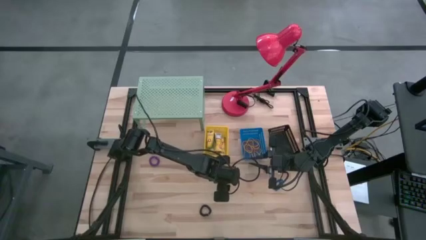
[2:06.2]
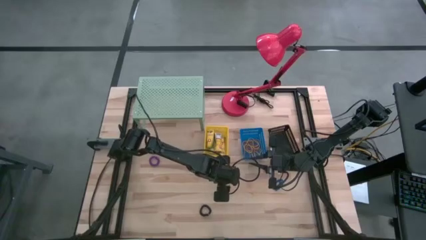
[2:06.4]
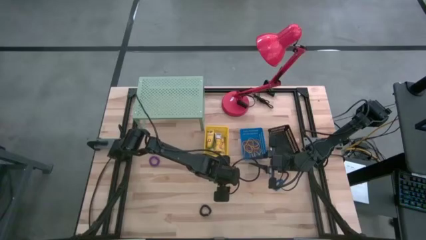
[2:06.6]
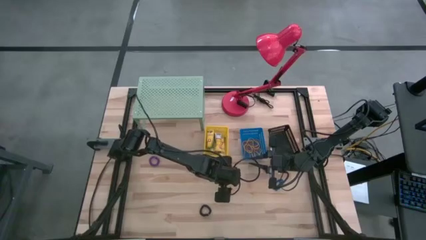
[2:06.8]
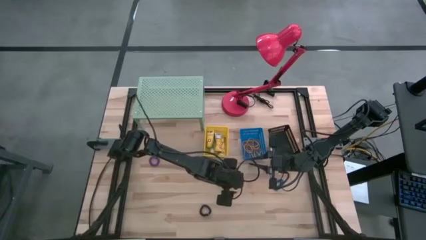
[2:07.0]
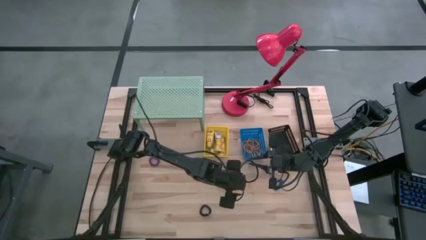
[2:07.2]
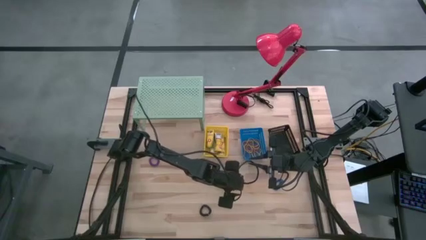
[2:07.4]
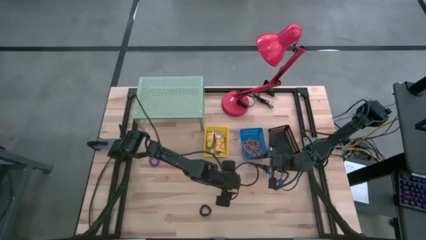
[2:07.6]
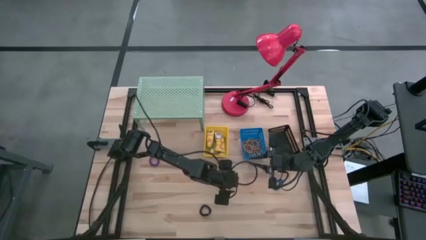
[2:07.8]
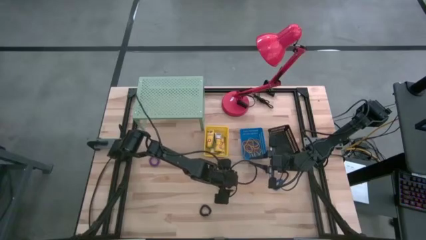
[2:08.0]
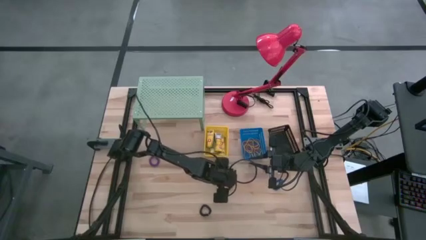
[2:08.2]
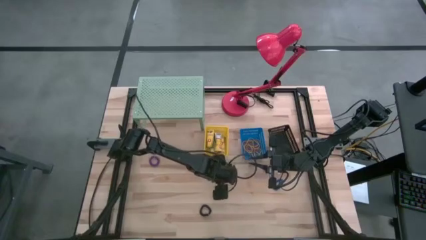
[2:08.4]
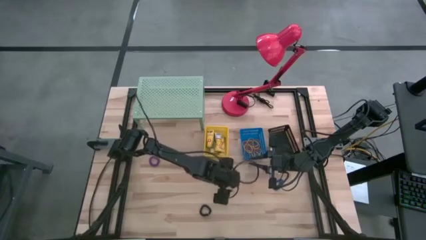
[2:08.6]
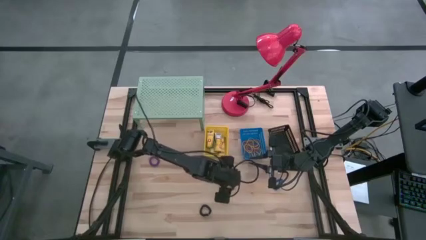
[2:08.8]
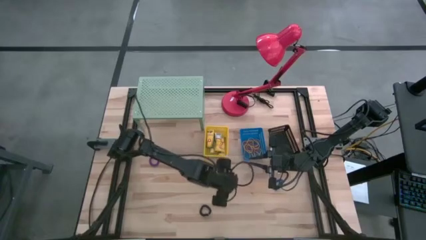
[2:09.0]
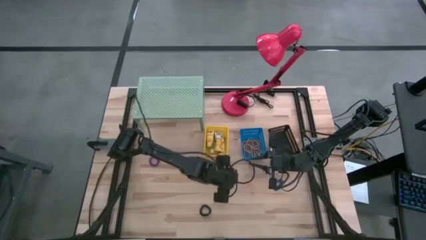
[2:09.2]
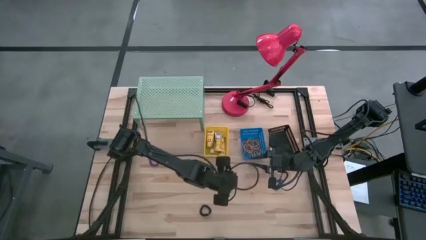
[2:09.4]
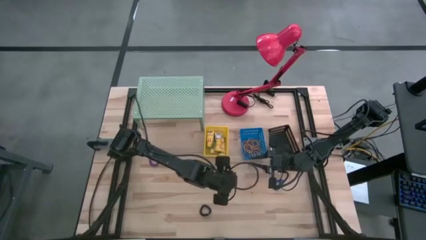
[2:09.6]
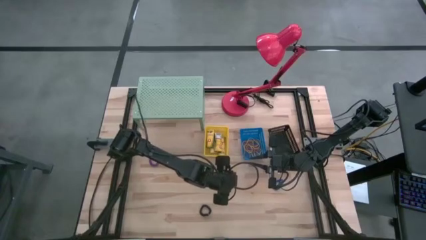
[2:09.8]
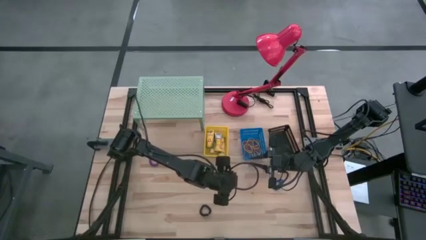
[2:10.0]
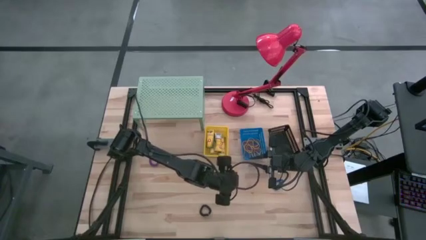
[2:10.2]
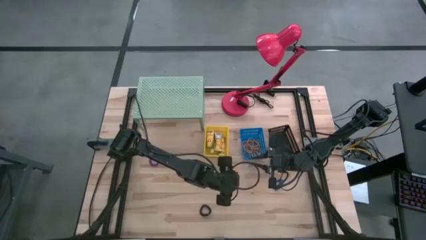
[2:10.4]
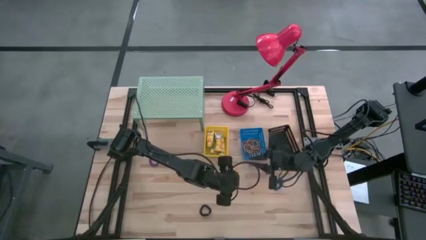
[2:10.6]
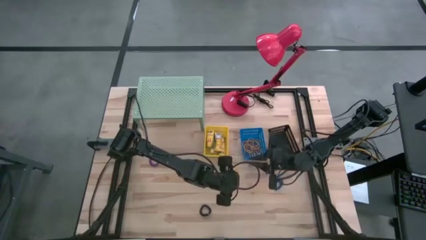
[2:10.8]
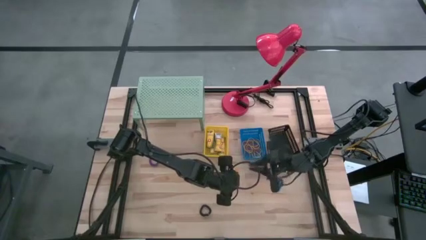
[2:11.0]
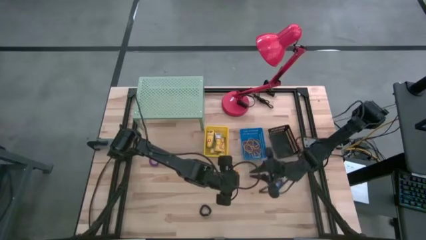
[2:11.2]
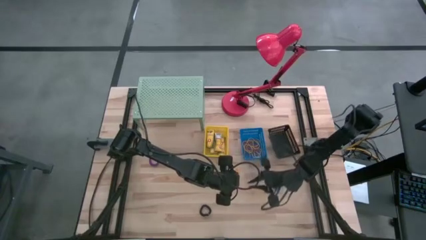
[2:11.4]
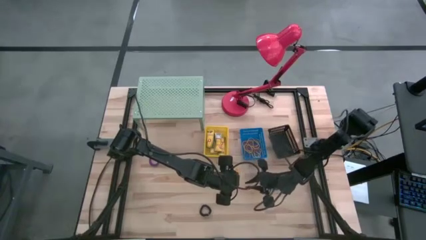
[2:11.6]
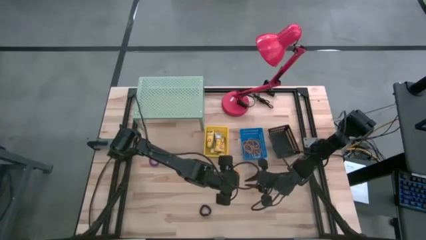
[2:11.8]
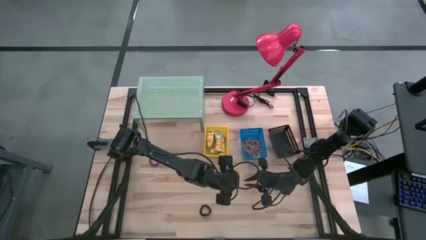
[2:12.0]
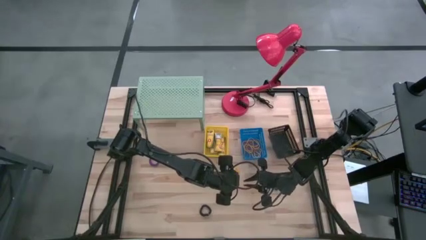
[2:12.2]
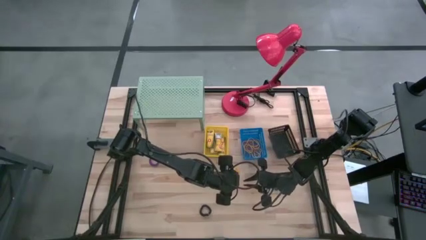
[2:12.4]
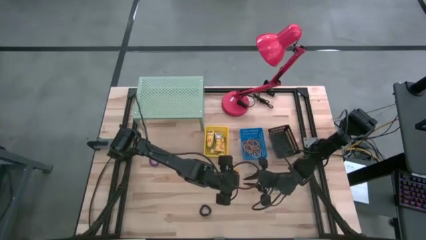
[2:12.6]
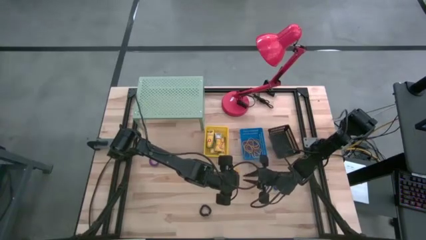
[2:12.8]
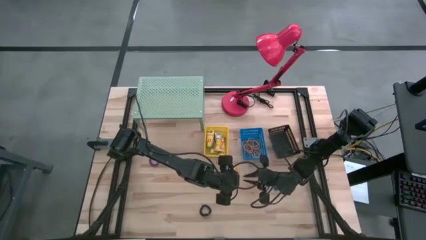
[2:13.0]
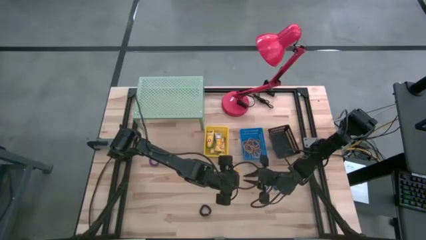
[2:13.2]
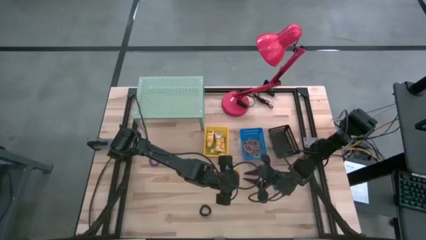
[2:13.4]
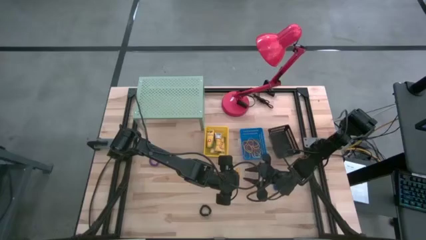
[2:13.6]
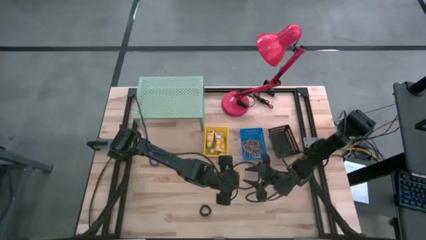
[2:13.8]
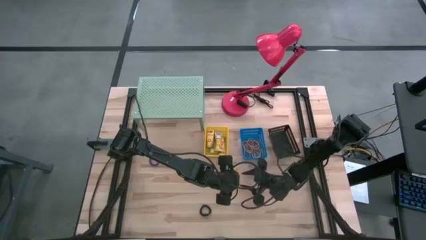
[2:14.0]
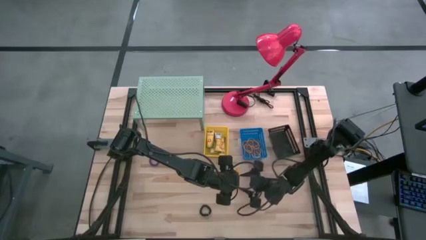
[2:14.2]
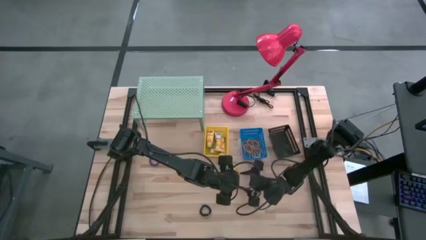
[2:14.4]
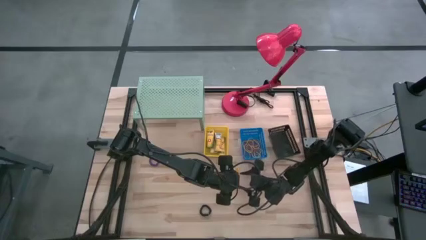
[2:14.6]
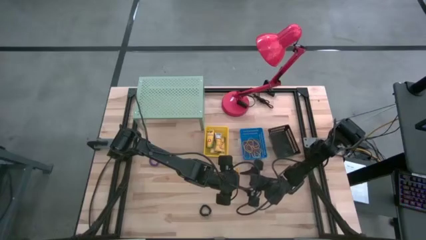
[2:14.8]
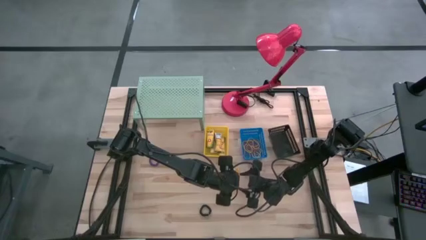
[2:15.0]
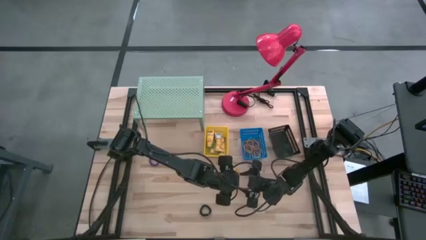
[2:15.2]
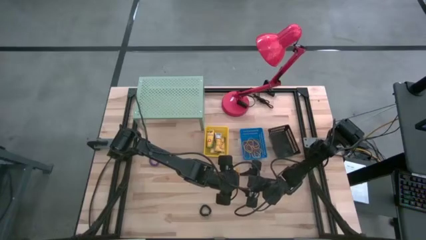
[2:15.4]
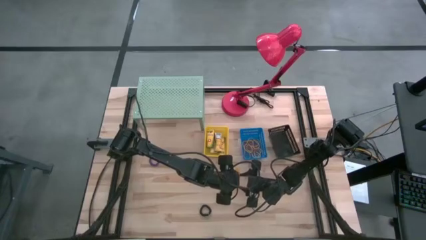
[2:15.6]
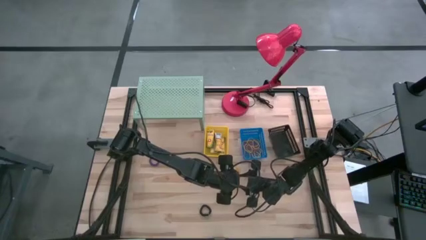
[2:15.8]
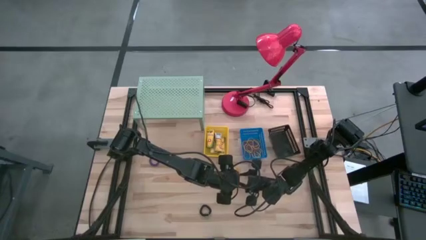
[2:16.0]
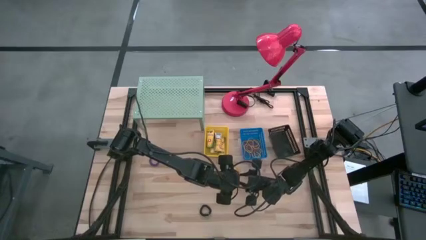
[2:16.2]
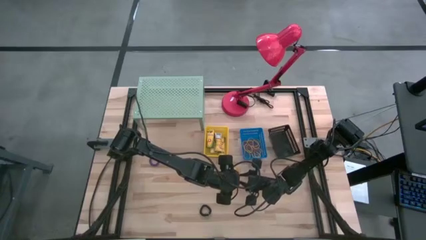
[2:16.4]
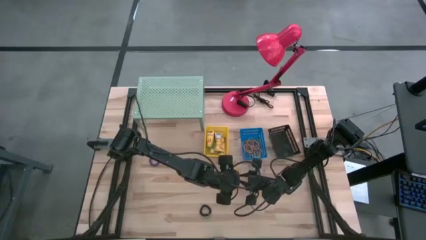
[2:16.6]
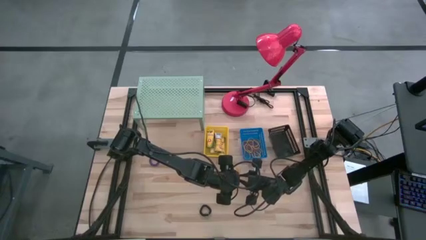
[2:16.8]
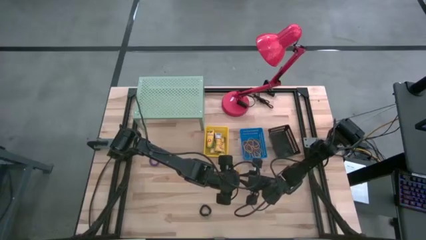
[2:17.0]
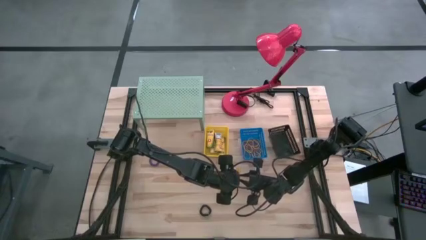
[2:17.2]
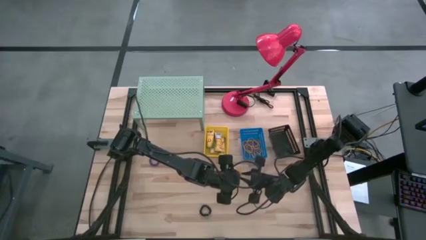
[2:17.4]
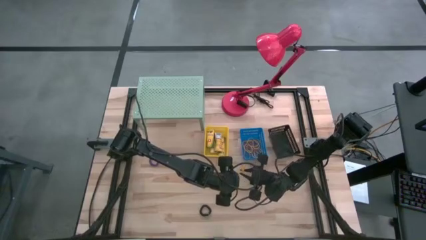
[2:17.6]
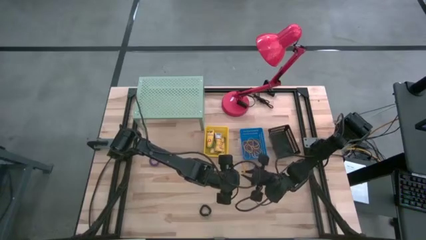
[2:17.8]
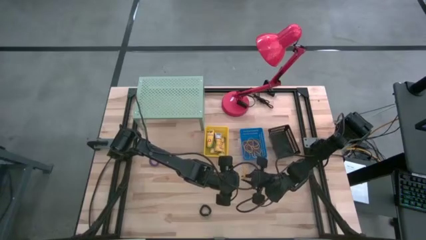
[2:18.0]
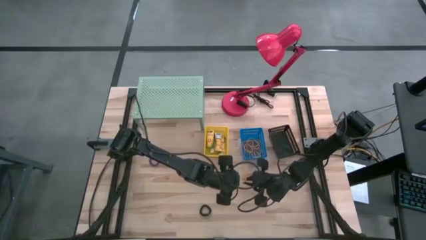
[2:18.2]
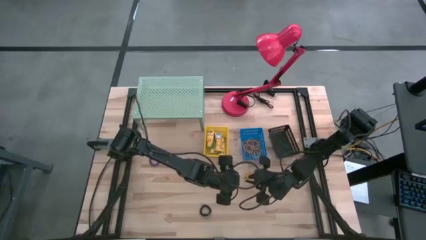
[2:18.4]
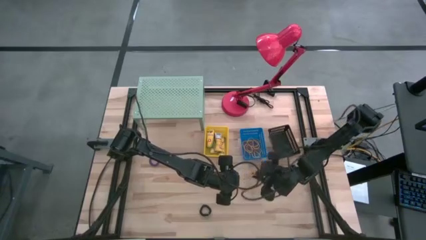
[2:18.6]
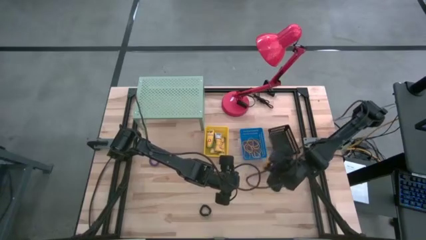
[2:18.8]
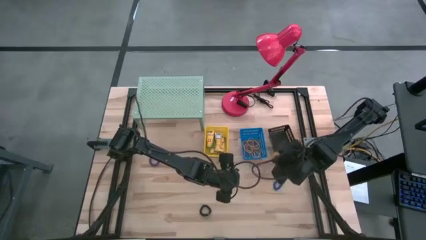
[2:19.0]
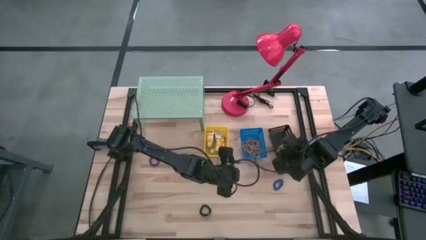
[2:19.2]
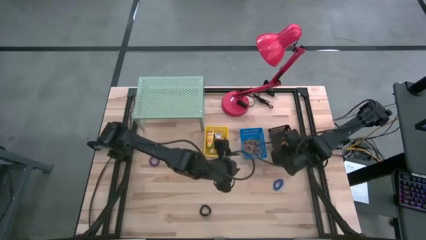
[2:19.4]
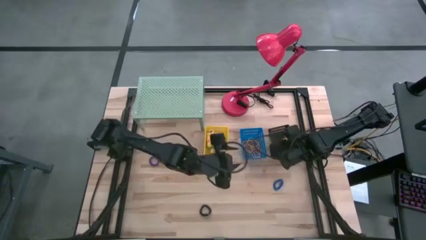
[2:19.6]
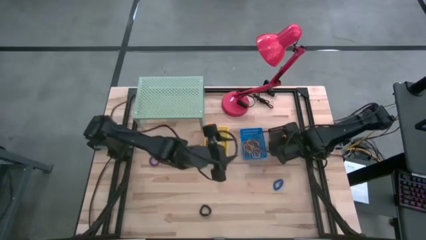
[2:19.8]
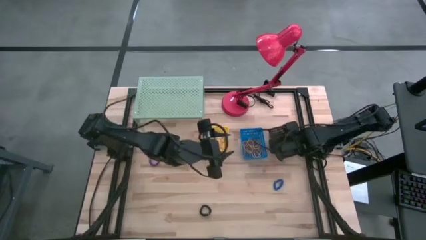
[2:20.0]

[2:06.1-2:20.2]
Task: Pick & Place Office Desk Supplies
Put the yellow spring keychain into the black basket

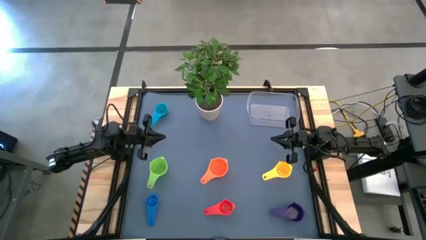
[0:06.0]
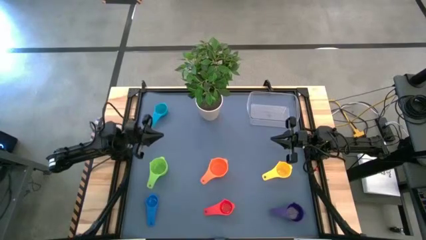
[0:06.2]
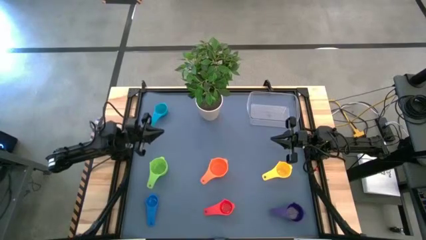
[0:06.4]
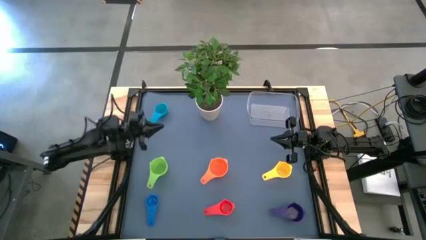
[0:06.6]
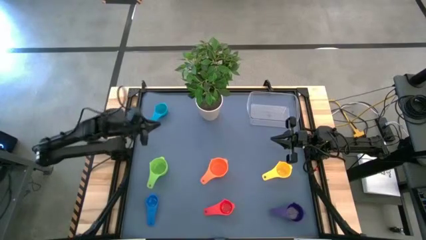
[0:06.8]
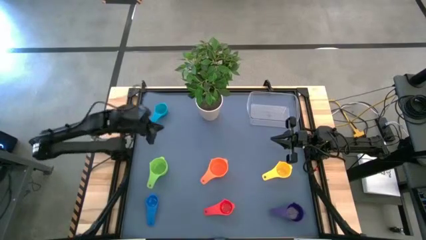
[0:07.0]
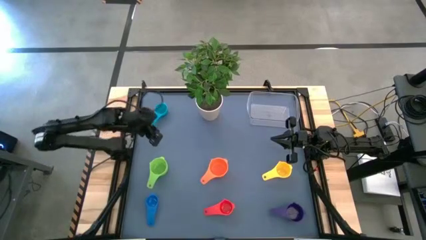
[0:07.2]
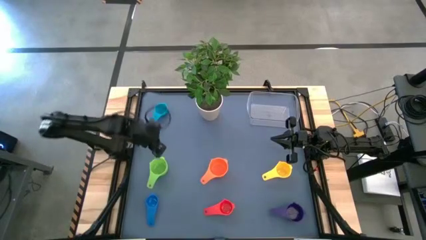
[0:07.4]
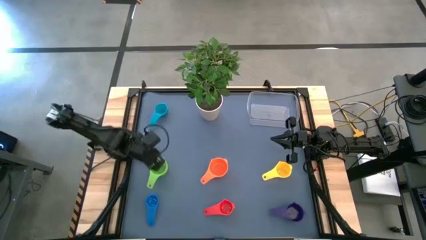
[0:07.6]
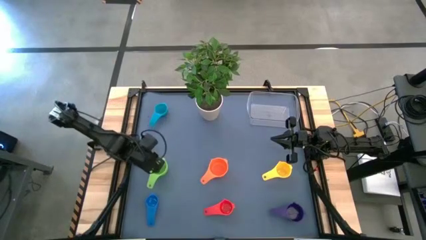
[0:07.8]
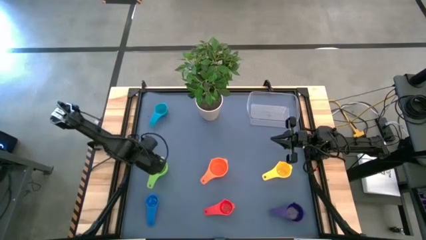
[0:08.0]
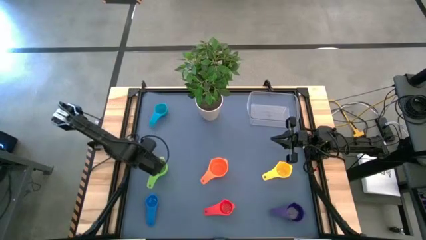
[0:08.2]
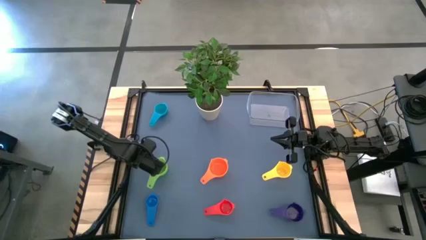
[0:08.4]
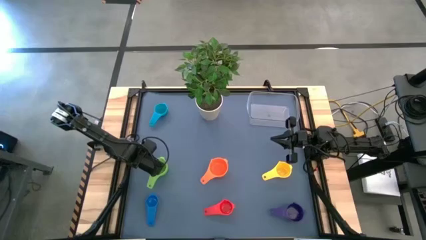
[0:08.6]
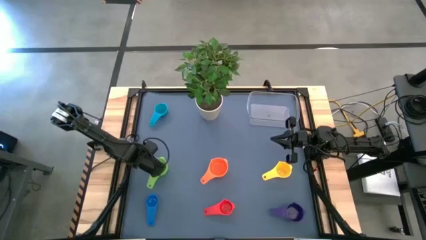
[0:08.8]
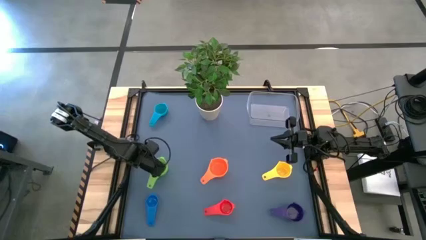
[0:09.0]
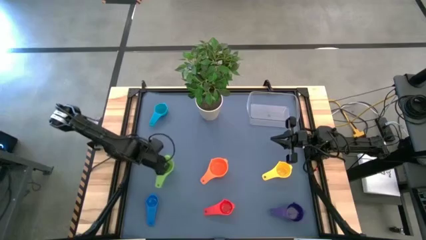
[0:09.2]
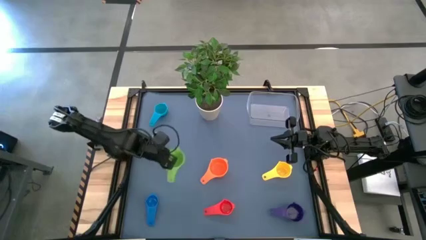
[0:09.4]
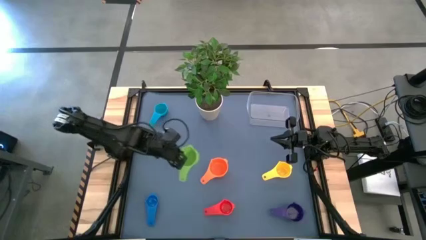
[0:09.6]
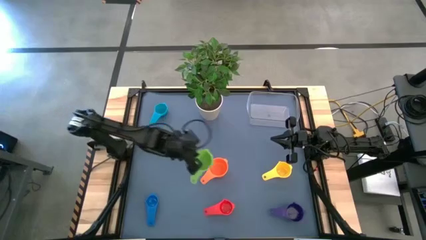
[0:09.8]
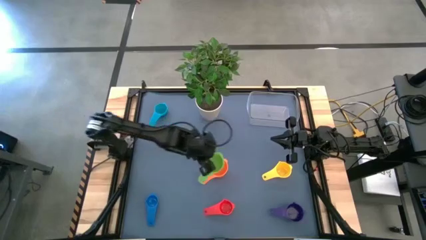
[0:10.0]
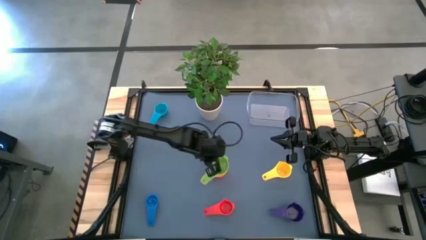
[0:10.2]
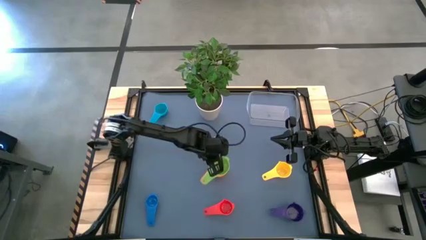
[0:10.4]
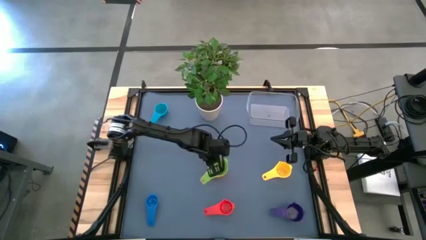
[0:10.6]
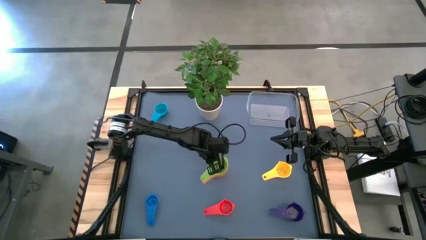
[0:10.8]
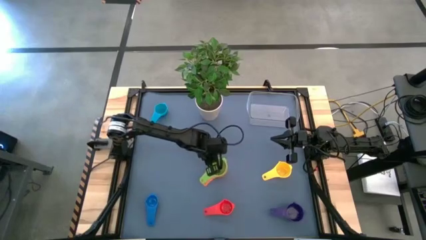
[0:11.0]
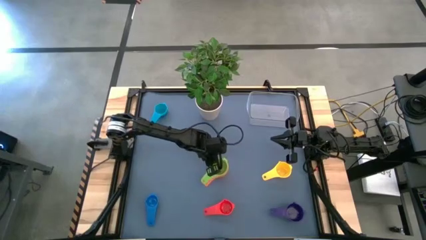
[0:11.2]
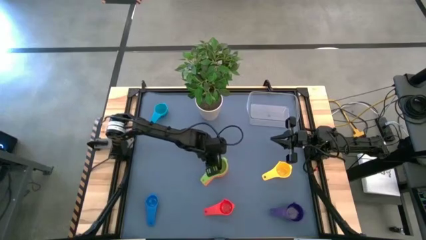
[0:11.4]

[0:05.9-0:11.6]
Task: Nest measuring cups in basket
Stack the green measuring cup on top of the orange measuring cup
